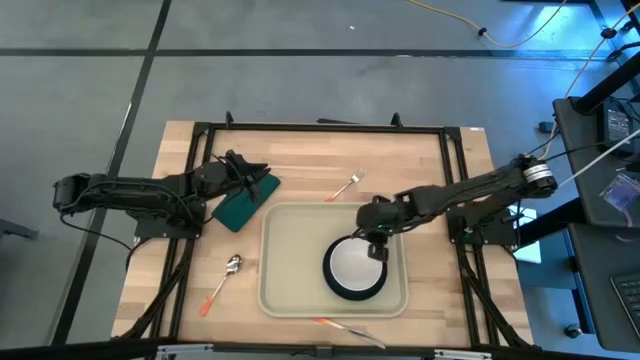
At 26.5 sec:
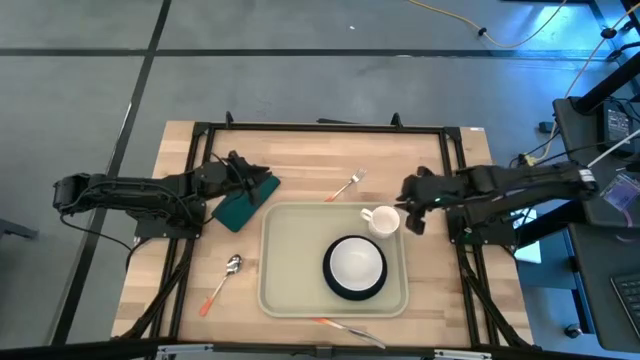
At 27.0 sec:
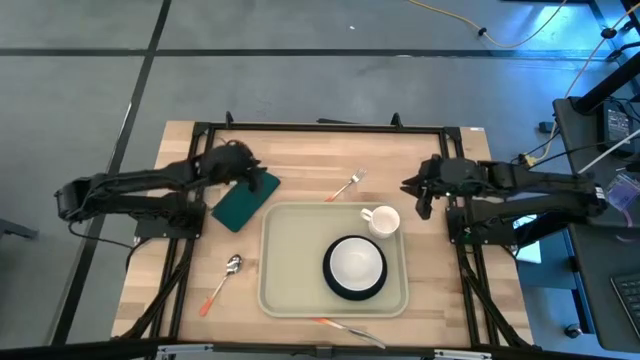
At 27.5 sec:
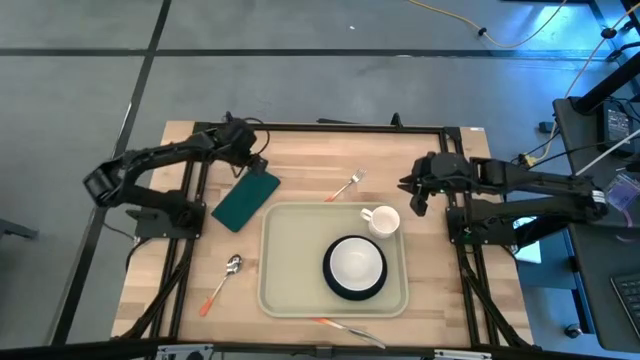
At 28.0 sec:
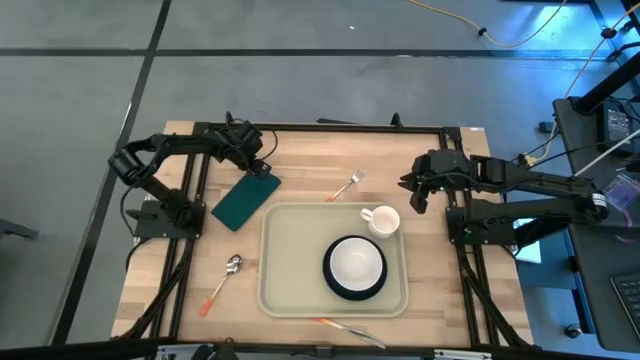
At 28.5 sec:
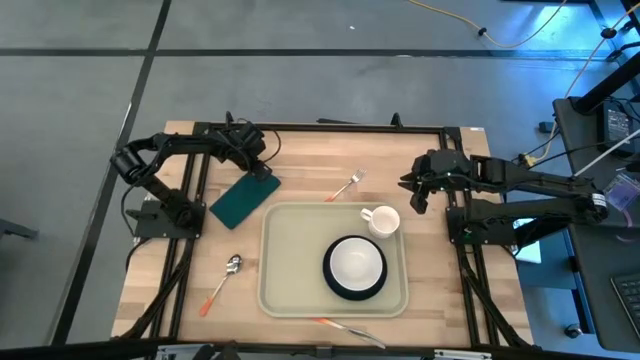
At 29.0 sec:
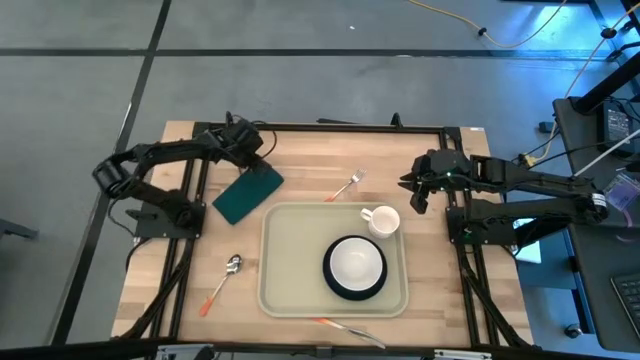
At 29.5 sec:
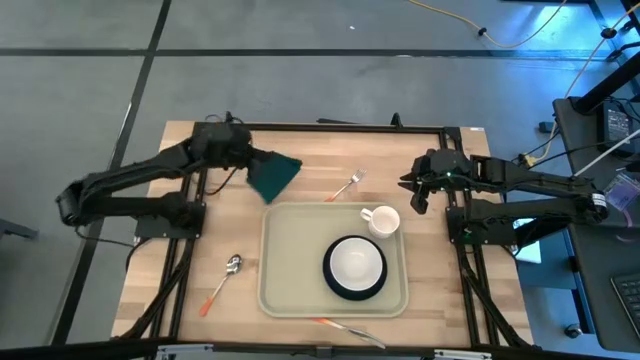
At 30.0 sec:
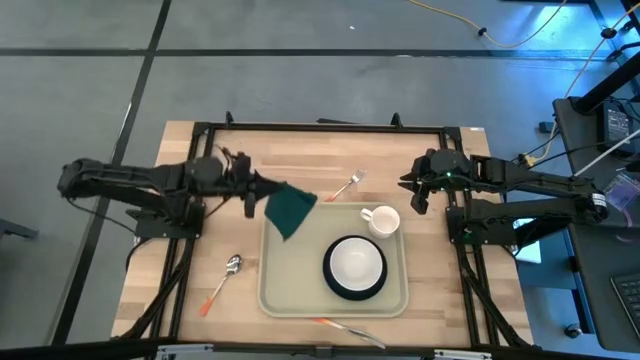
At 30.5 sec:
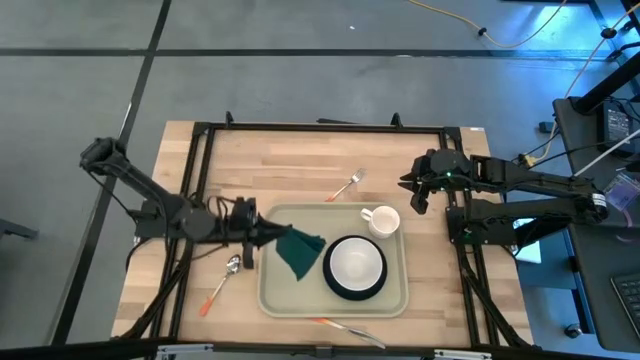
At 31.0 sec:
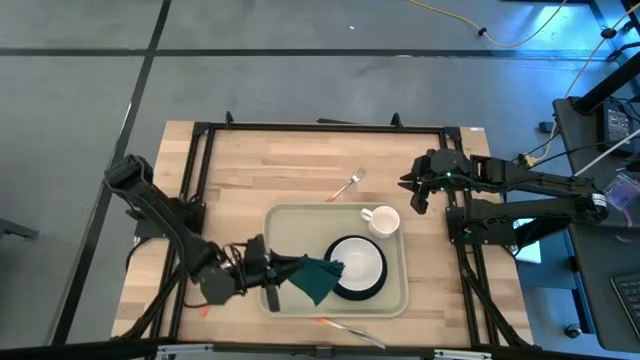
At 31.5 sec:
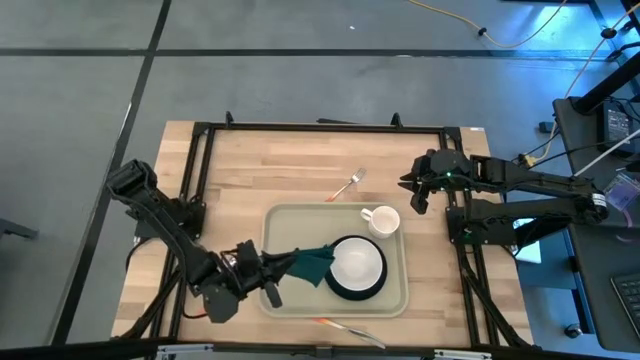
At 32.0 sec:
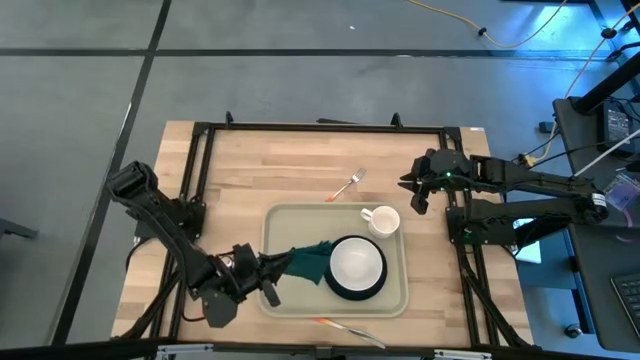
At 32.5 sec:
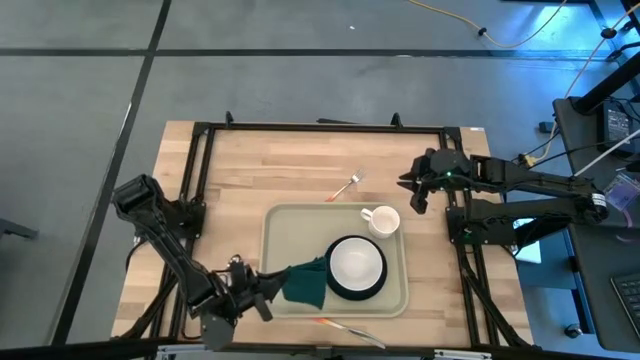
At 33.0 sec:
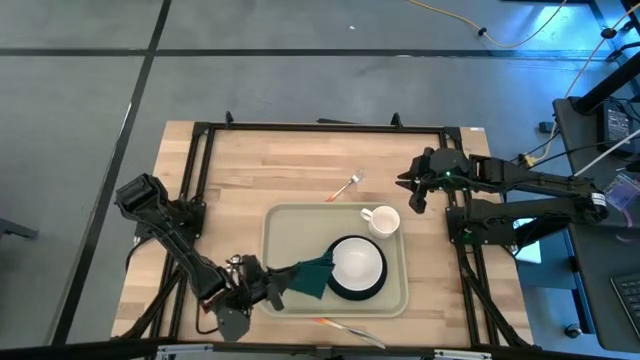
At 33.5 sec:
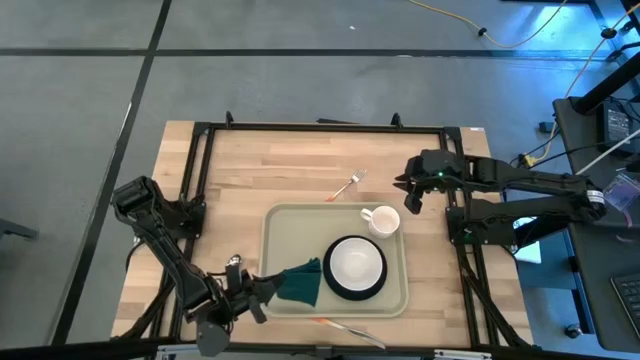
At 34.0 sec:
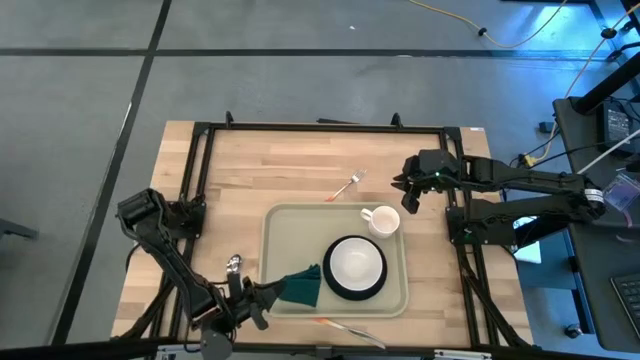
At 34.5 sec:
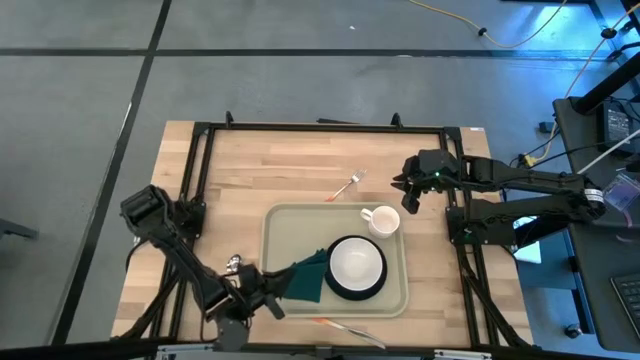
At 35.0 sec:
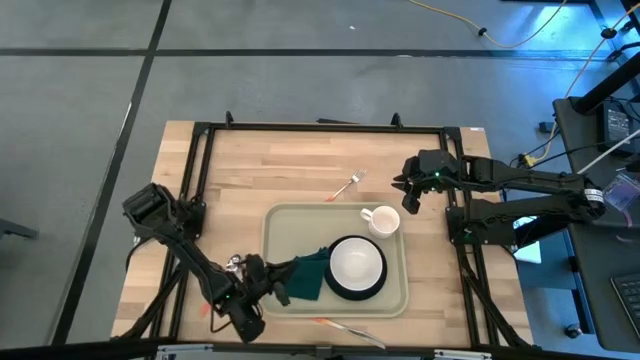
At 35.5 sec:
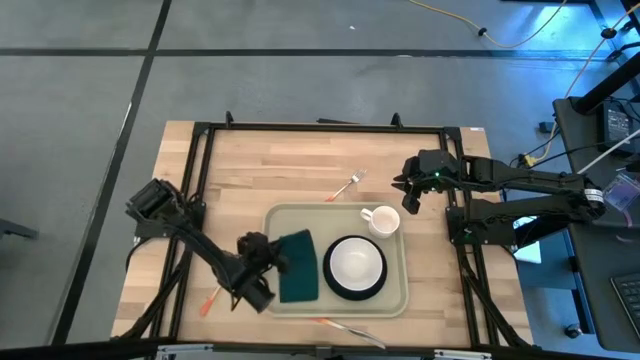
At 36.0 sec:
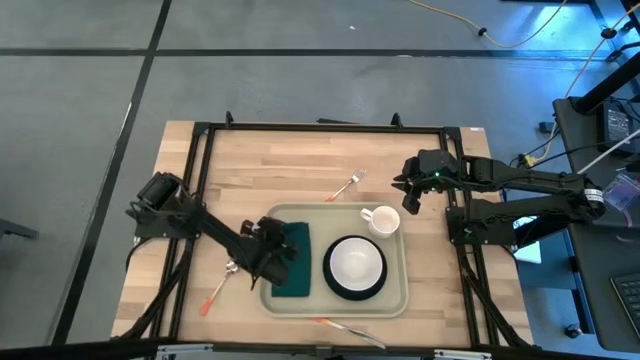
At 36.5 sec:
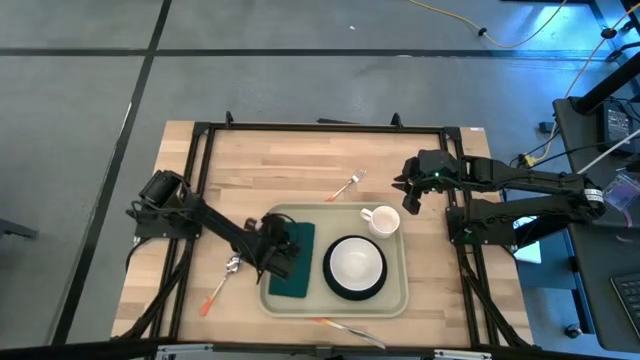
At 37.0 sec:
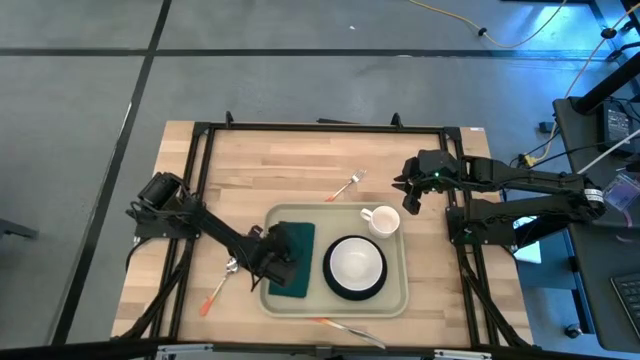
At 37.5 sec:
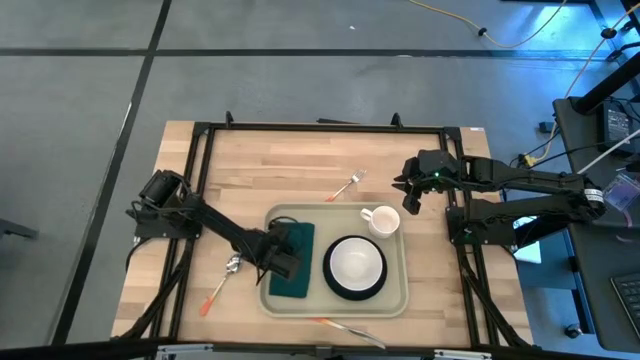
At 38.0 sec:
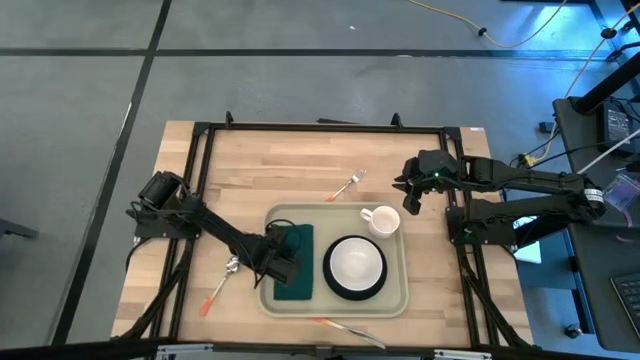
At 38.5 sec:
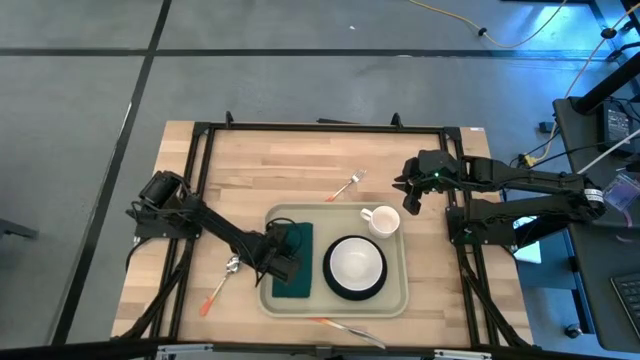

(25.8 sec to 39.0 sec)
Task: Set up tray
Put the green napkin on the light brown serving tray

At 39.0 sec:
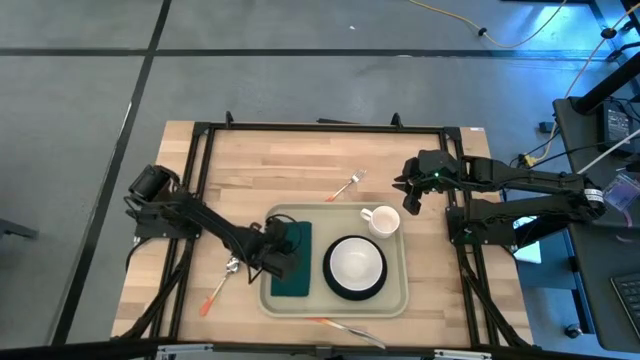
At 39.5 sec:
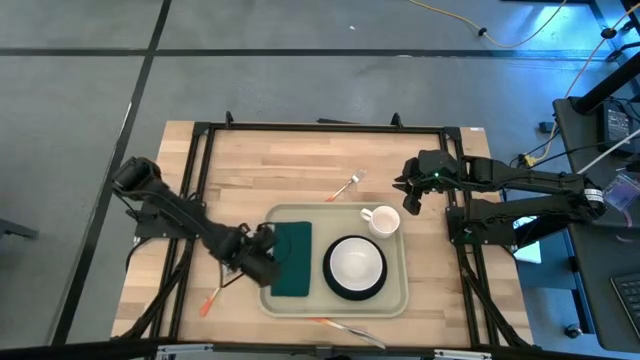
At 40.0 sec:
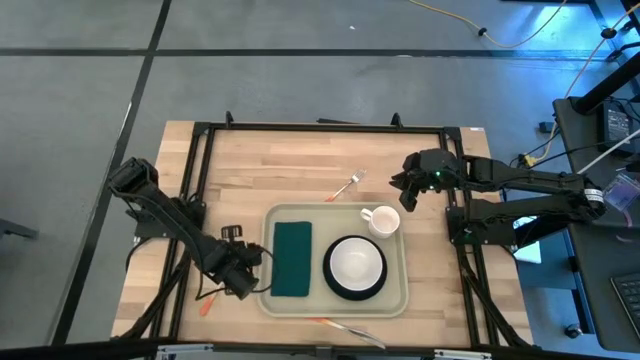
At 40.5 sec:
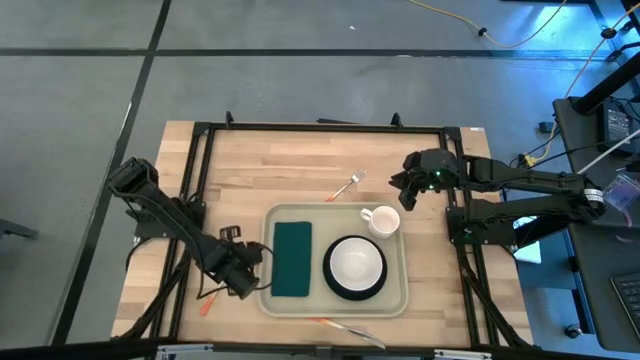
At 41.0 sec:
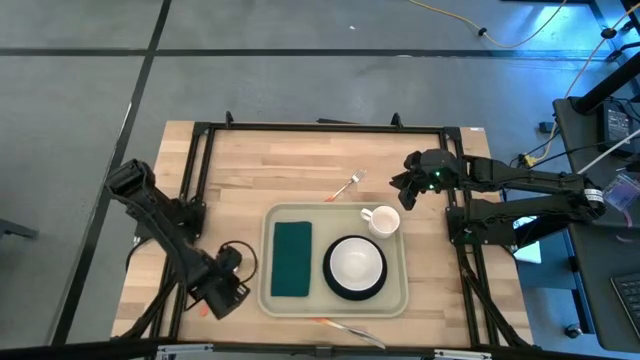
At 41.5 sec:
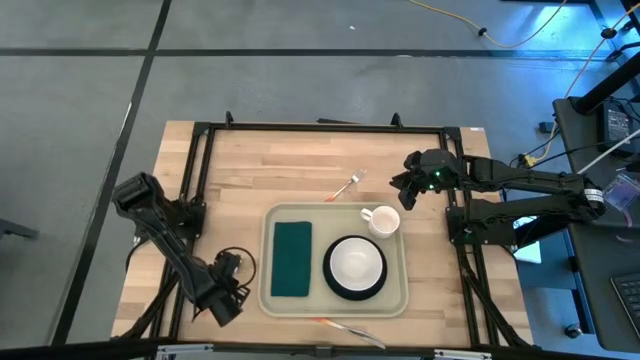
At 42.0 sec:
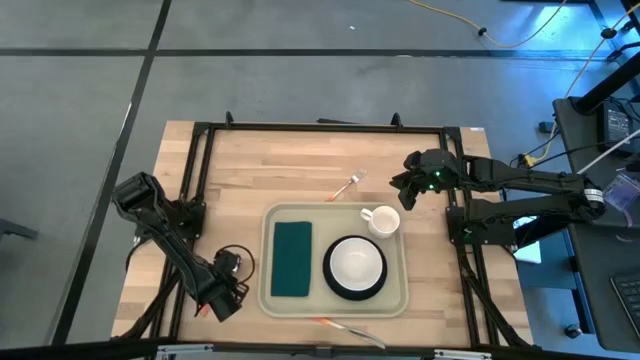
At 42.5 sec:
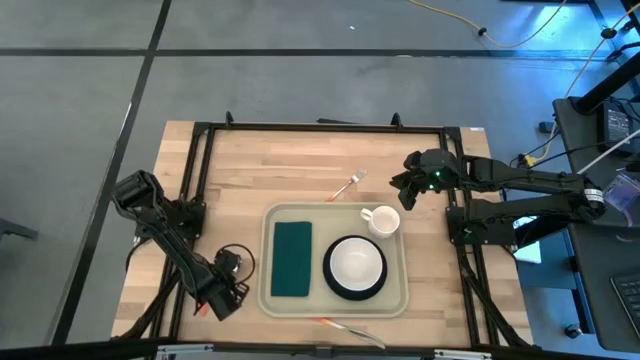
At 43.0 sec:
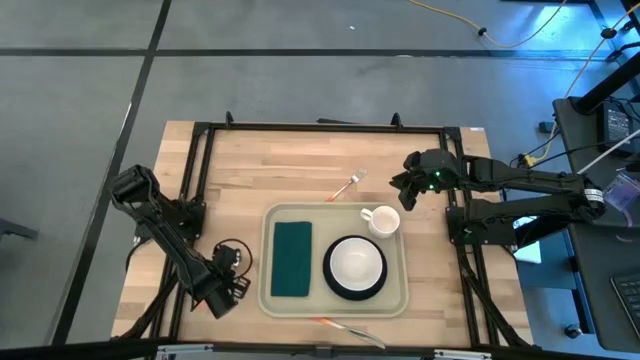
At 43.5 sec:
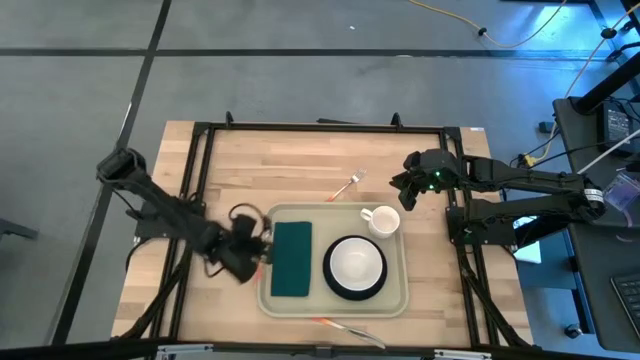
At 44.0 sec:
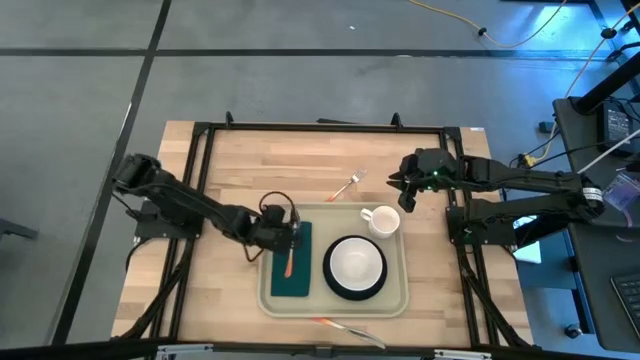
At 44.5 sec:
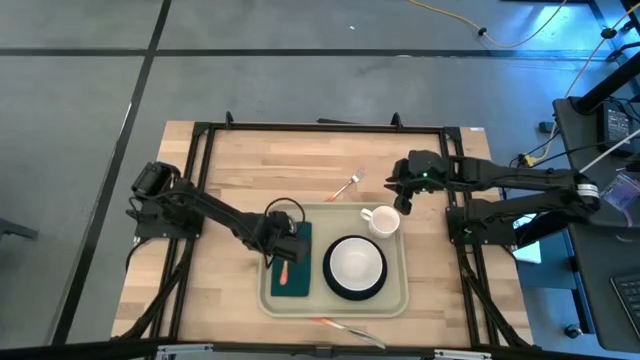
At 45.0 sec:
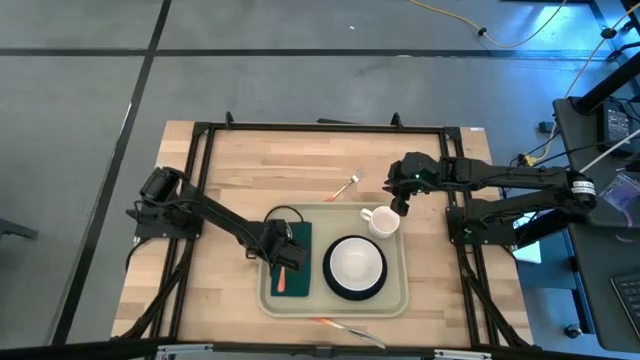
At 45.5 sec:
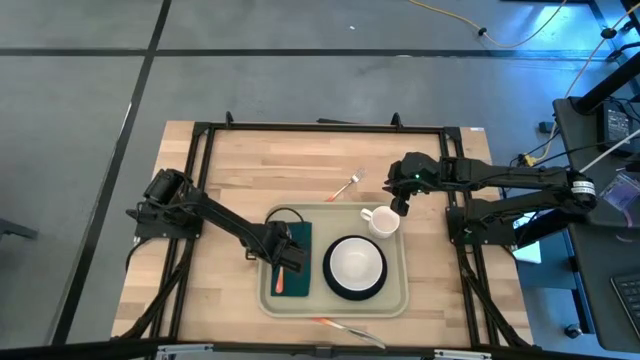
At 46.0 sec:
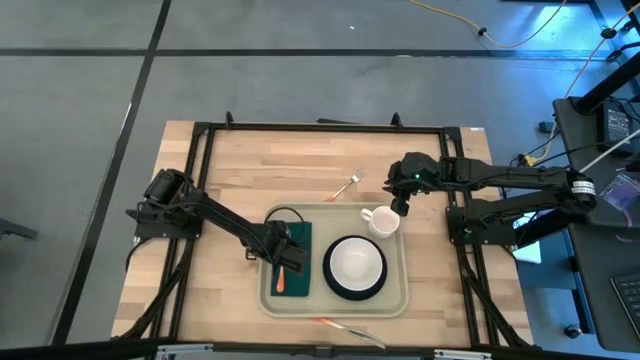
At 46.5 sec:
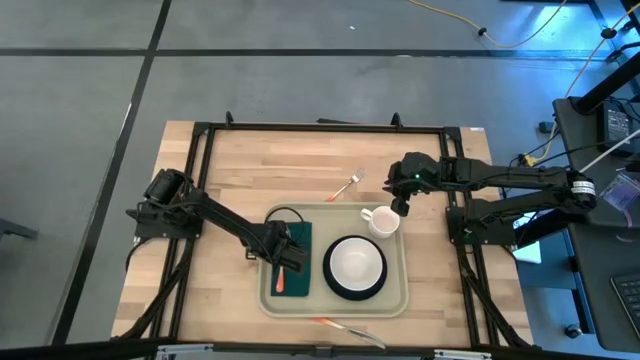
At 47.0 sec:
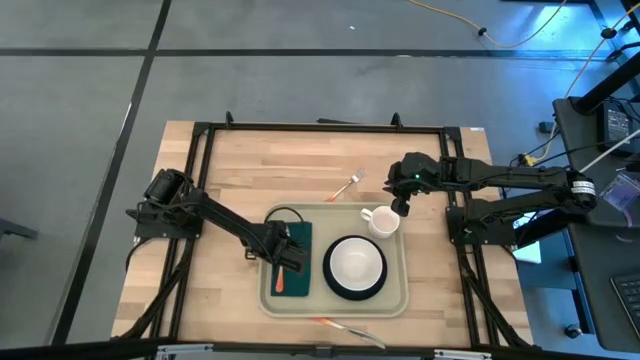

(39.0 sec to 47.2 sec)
Put the orange spoon on the green napkin
